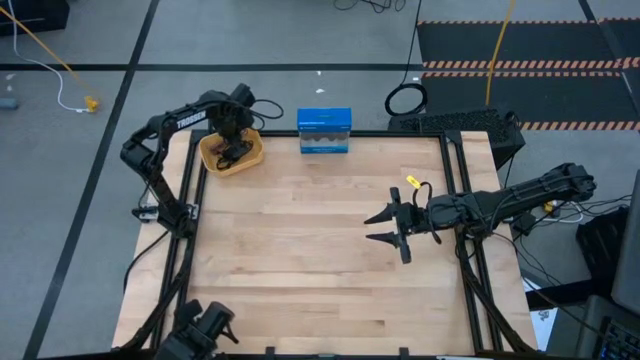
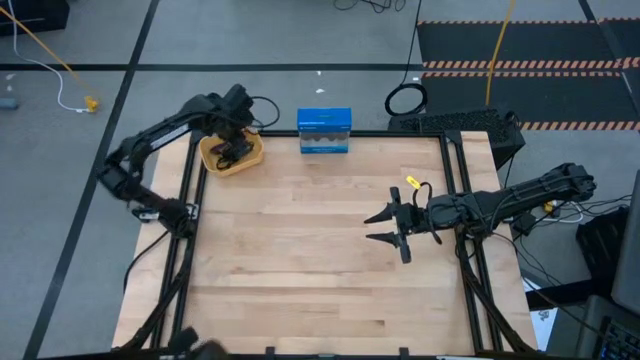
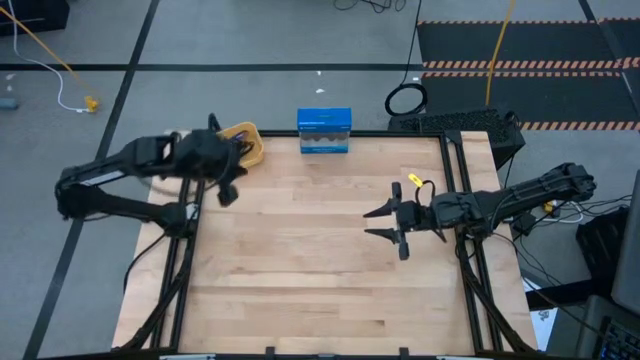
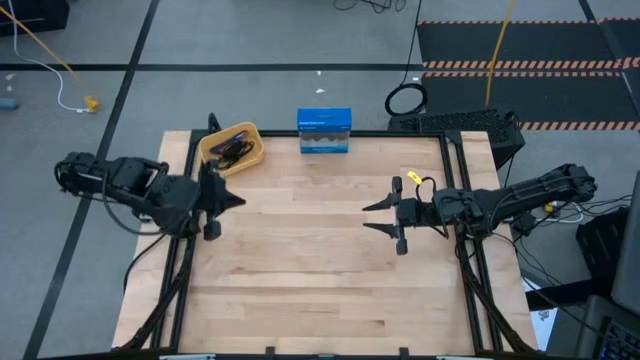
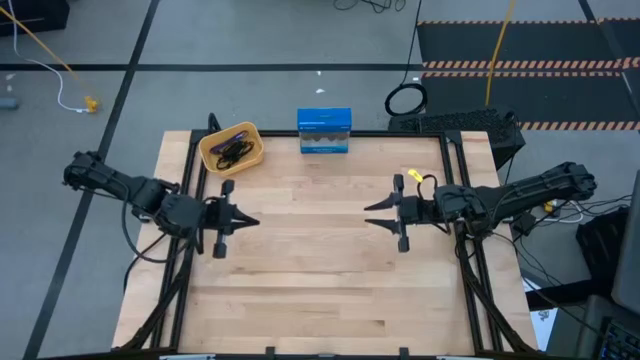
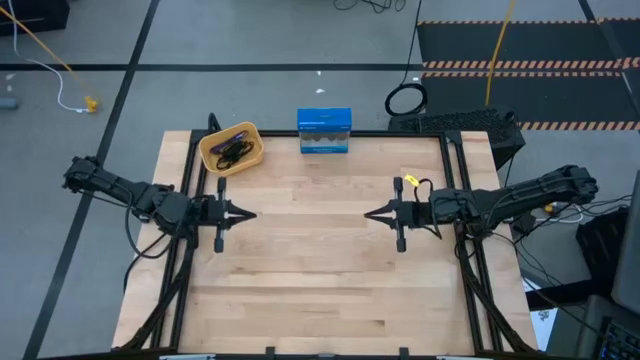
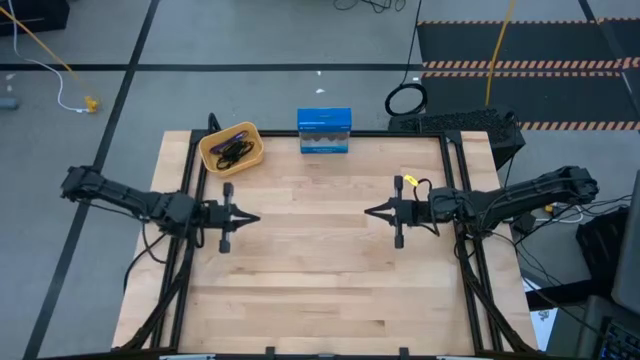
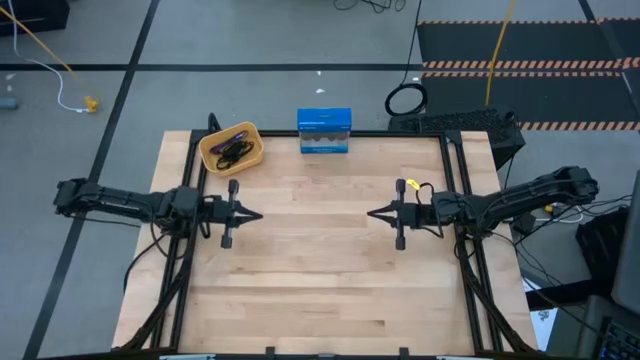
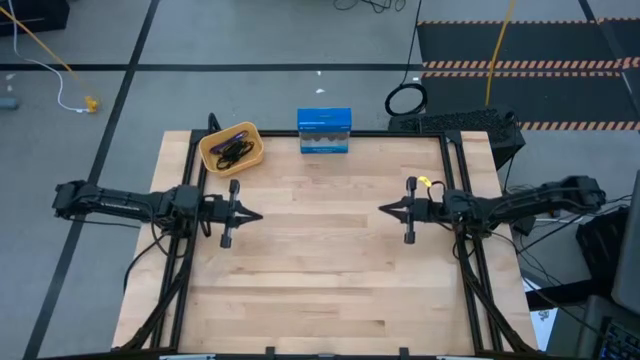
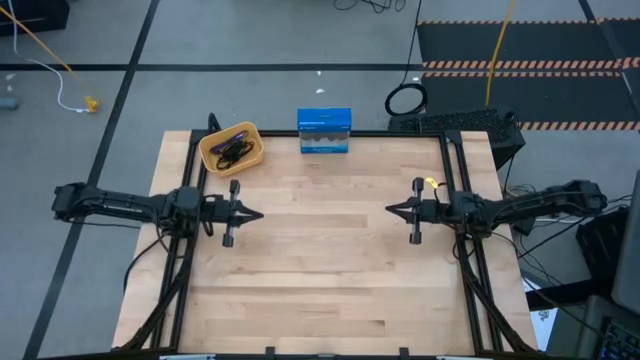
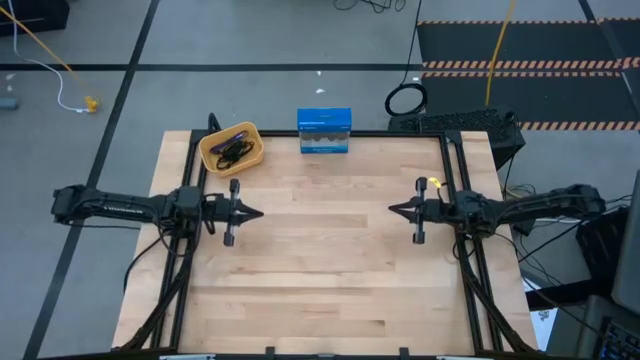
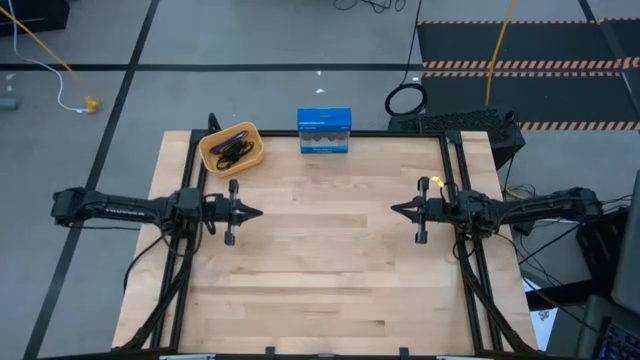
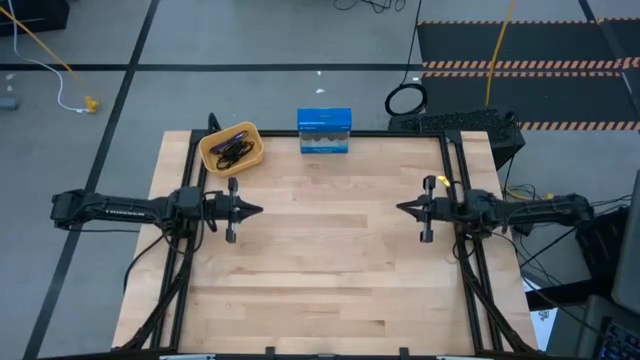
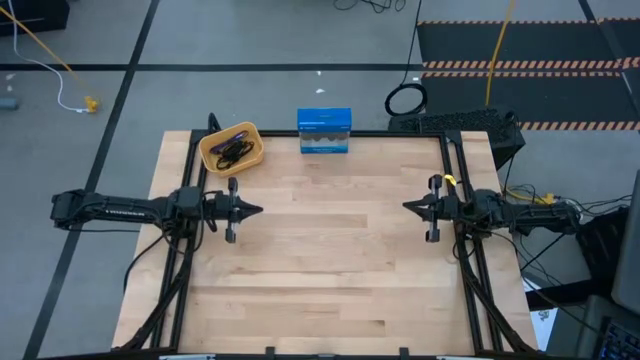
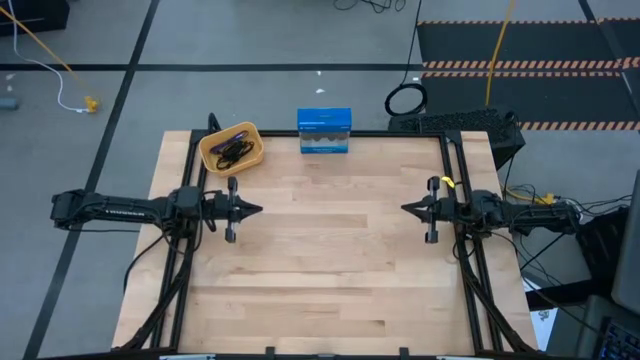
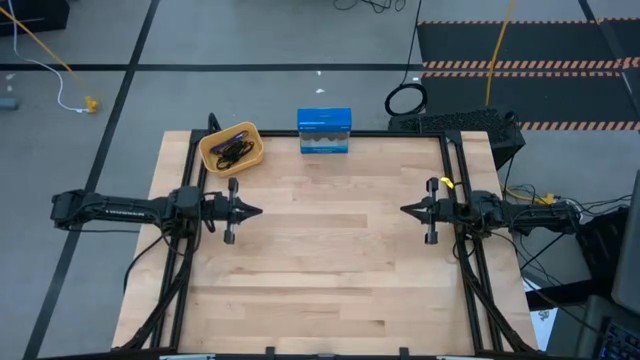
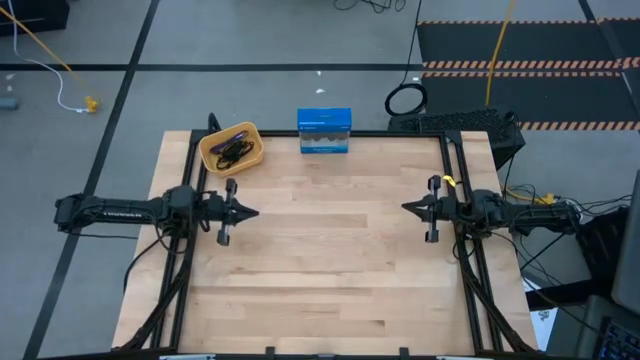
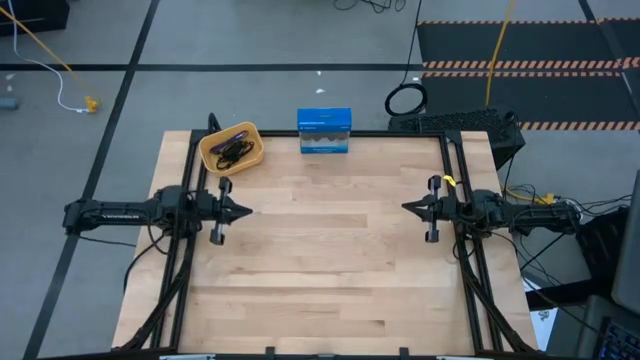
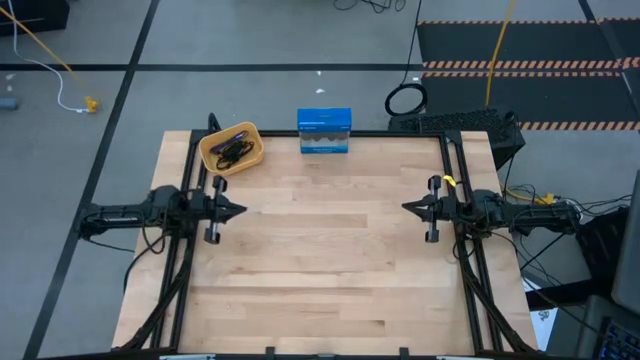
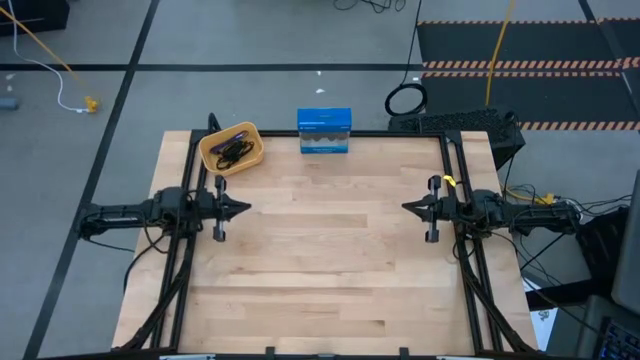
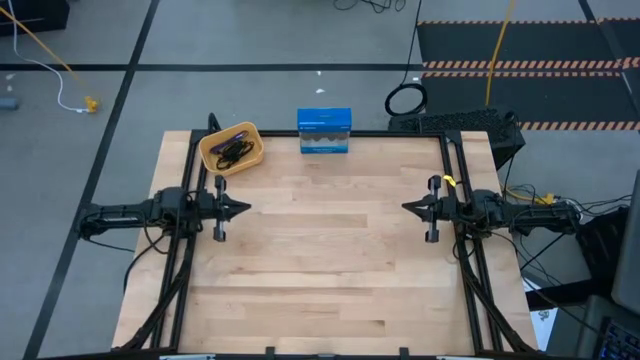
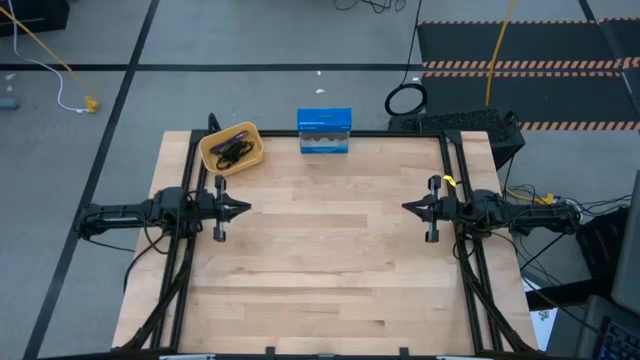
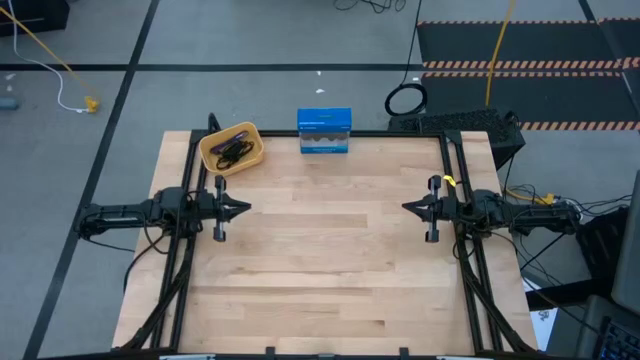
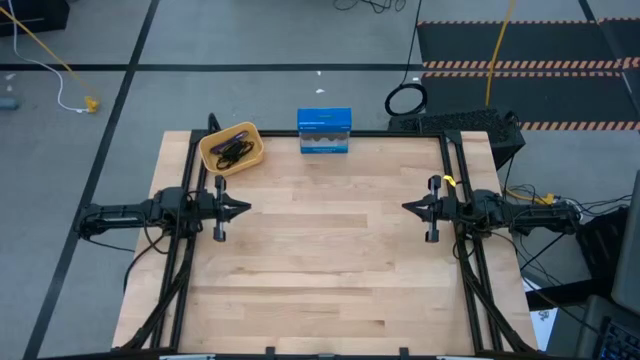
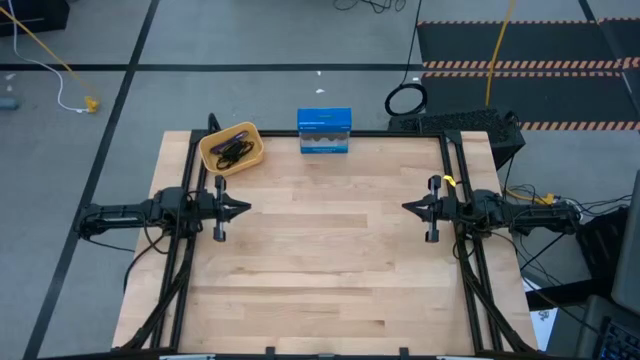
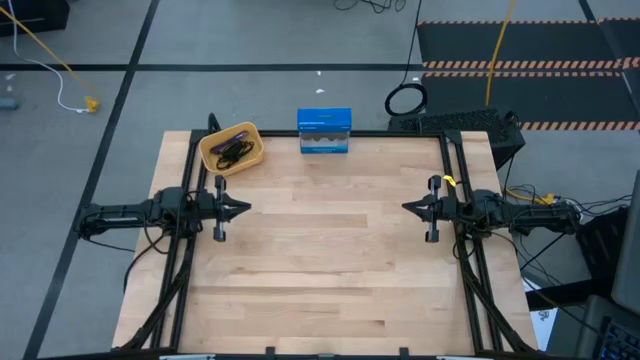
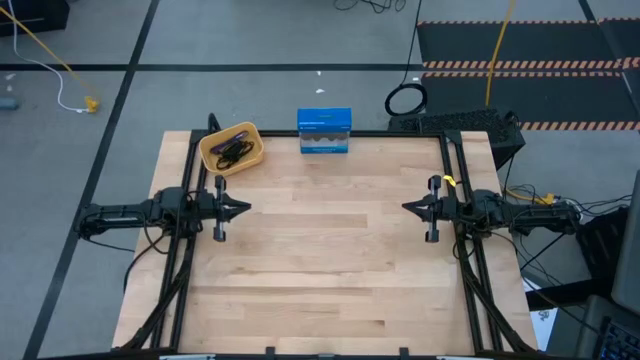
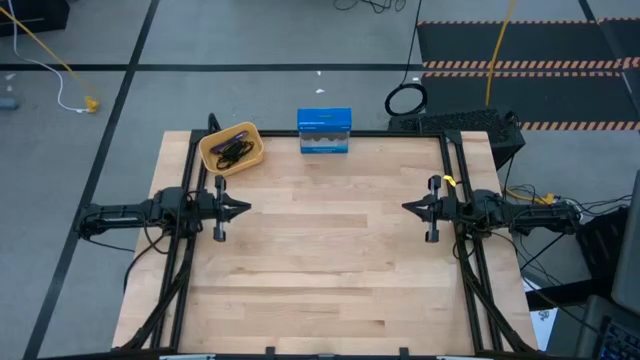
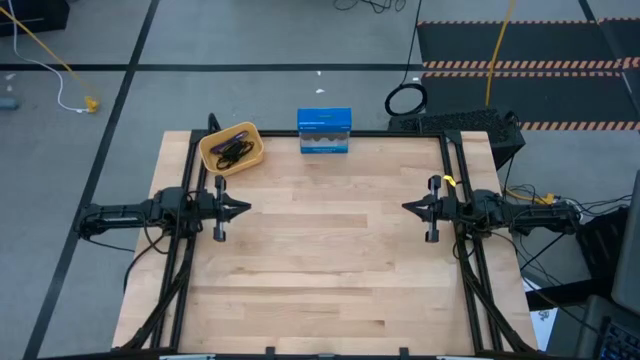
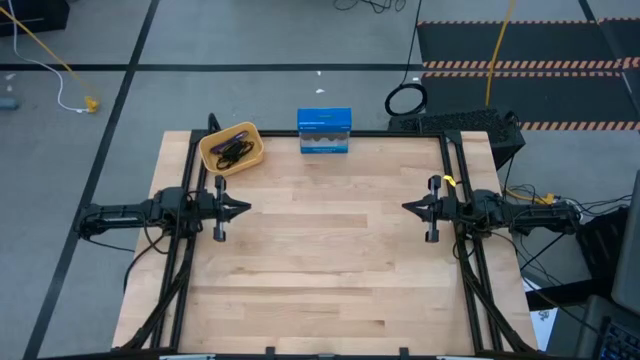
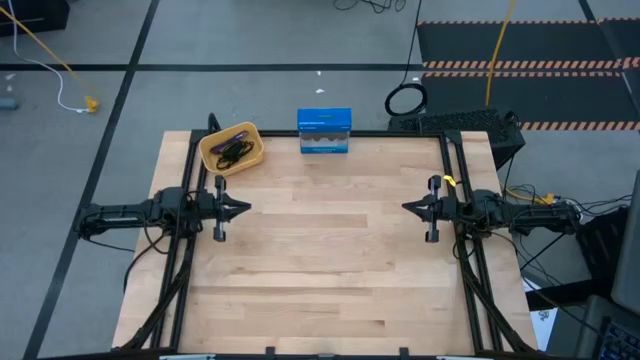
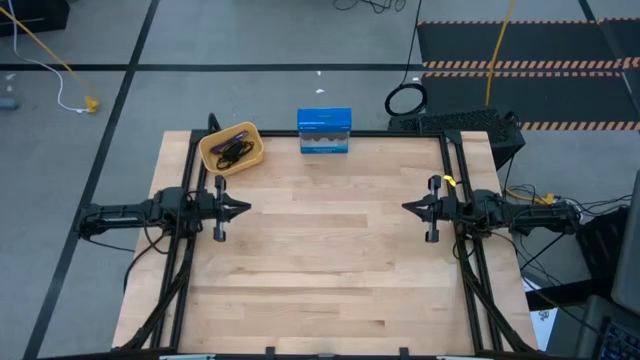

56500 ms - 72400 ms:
Task: Pick and place USB-C Cables
Return to Home Position
